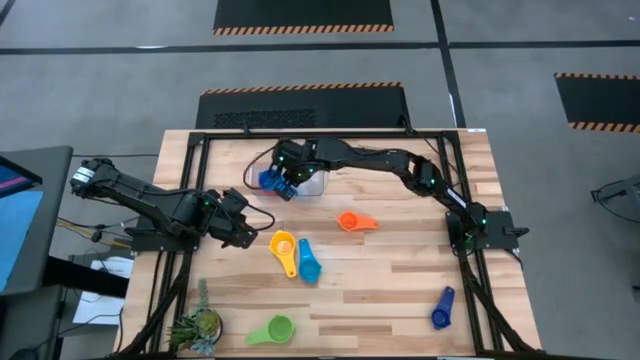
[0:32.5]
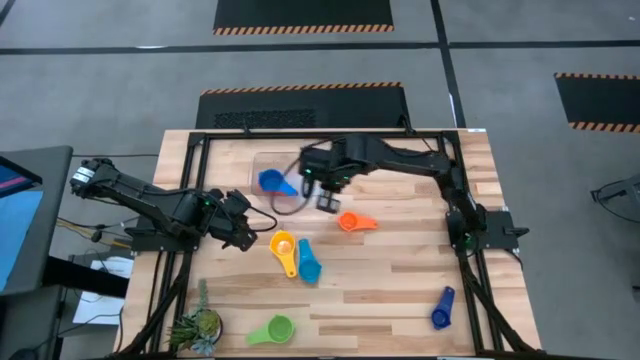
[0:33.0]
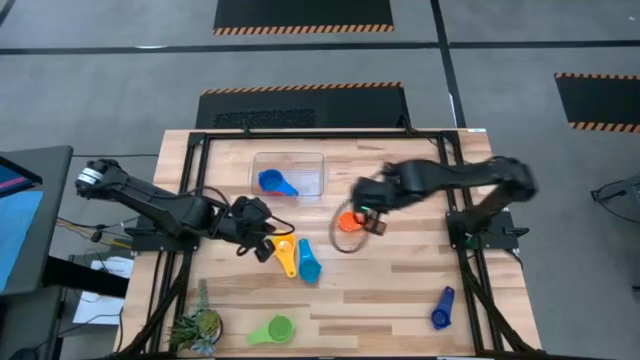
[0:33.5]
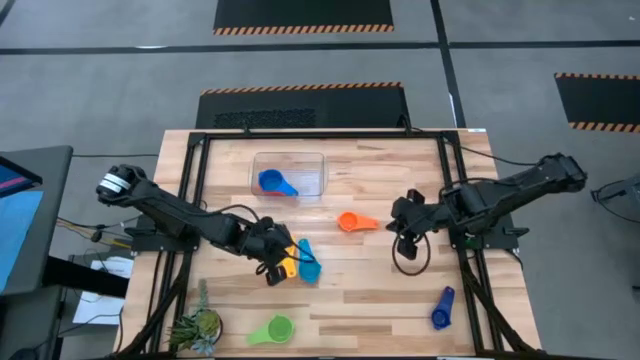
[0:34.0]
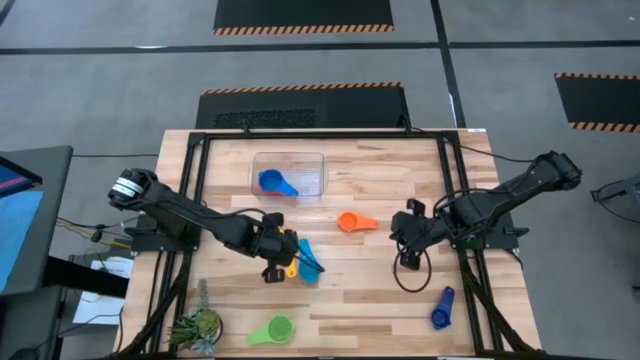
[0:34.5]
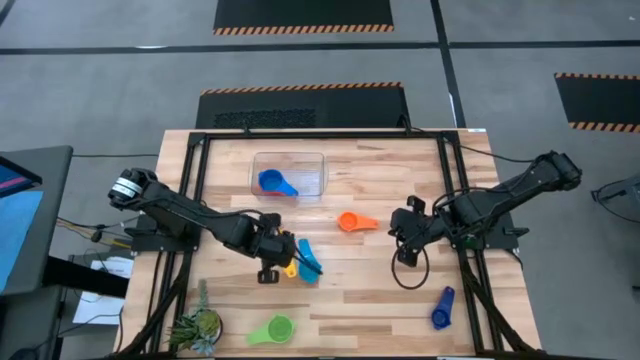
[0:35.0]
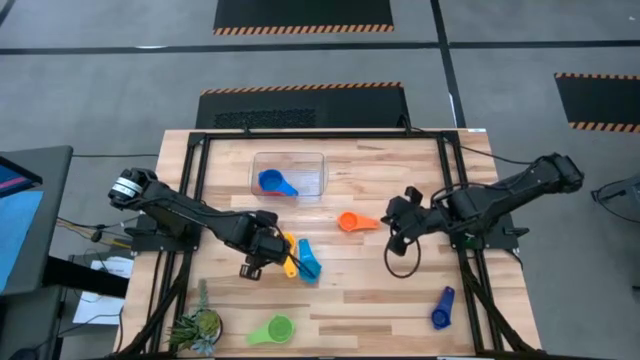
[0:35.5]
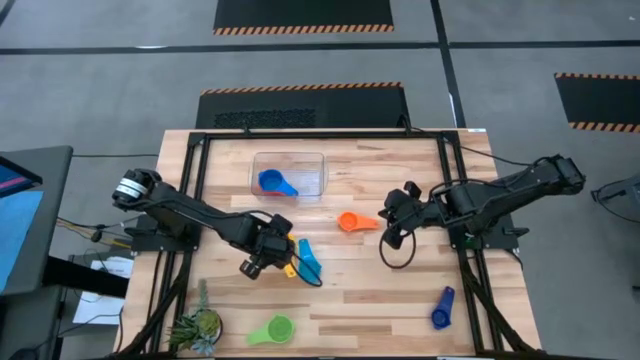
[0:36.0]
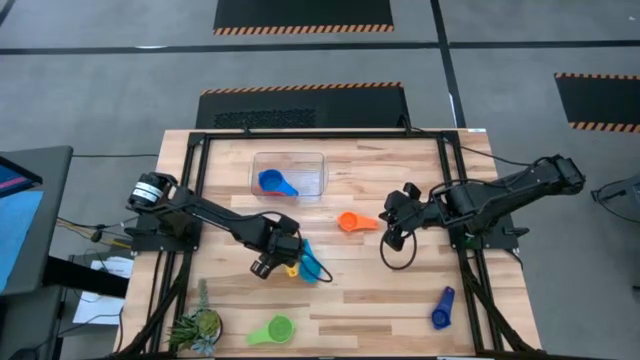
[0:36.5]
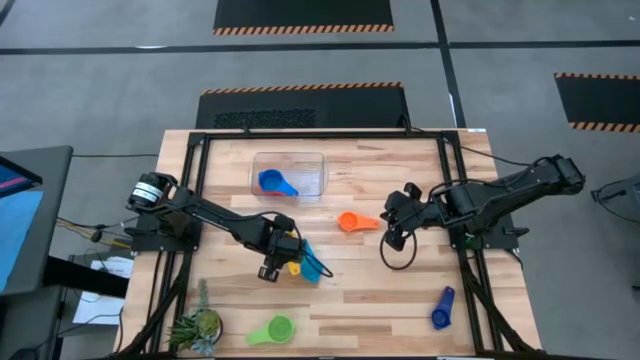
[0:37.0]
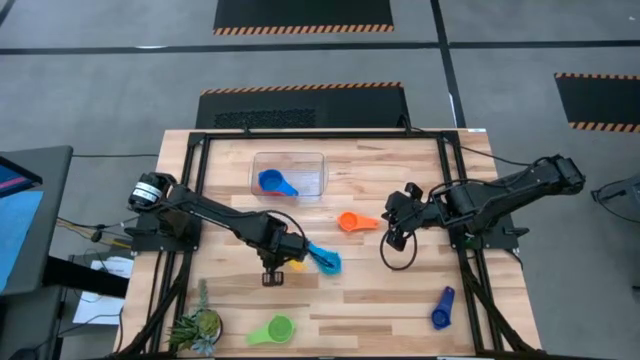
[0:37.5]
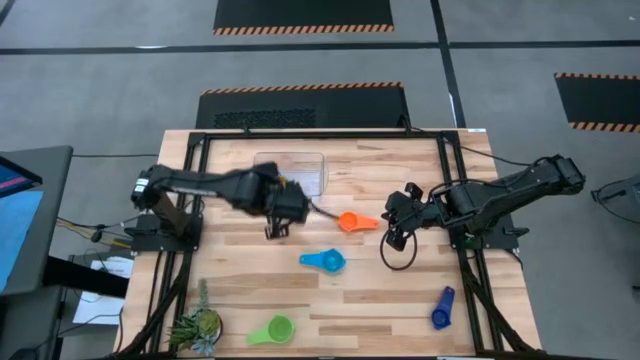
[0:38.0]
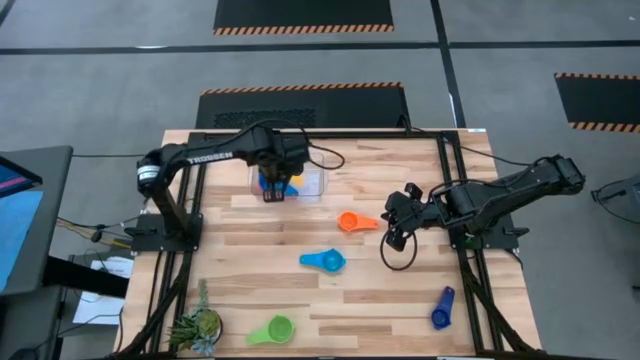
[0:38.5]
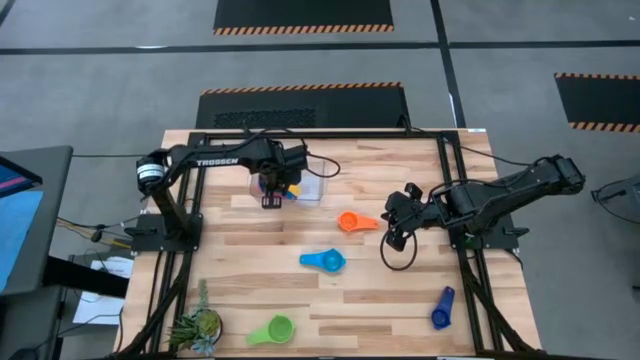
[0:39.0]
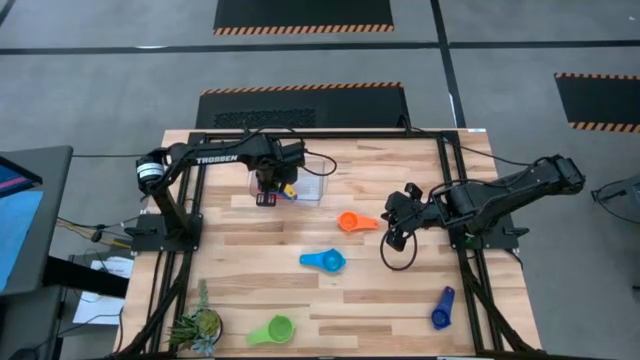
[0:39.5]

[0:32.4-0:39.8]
Task: Nest measuring cups in basket
Stack the yellow measuring cup on top of the blue measuring cup in the transparent bin

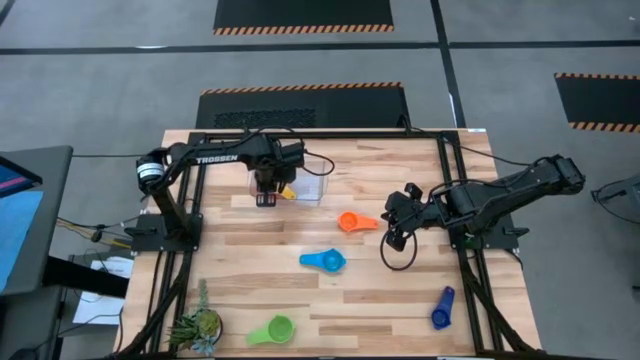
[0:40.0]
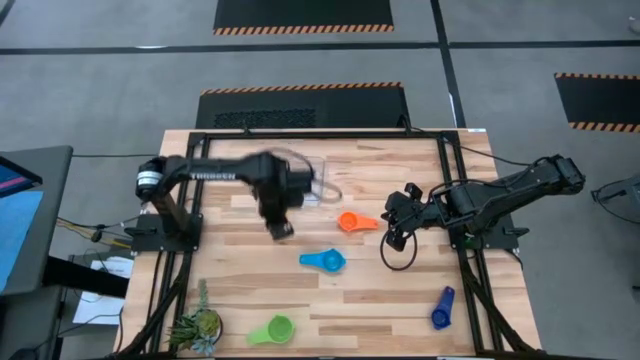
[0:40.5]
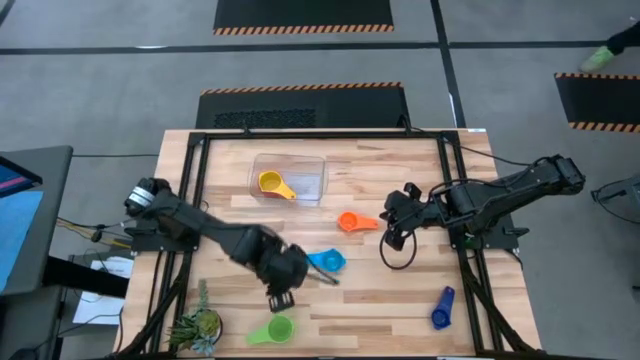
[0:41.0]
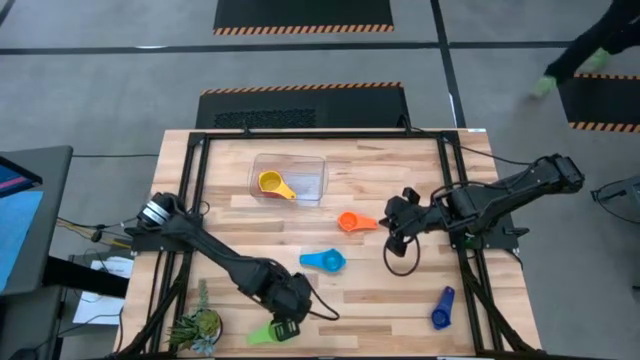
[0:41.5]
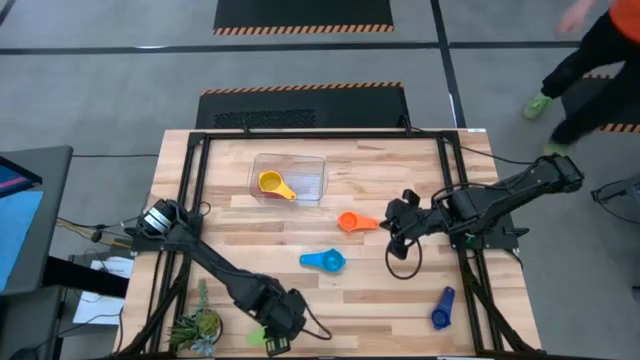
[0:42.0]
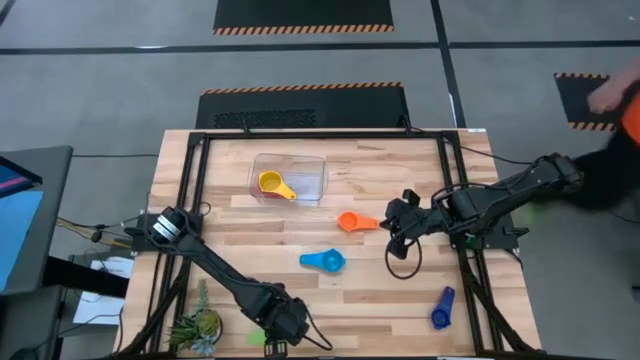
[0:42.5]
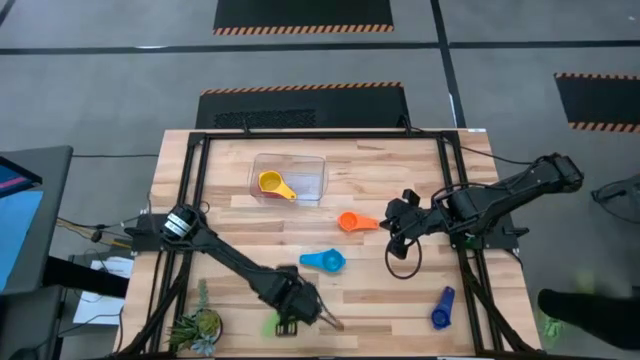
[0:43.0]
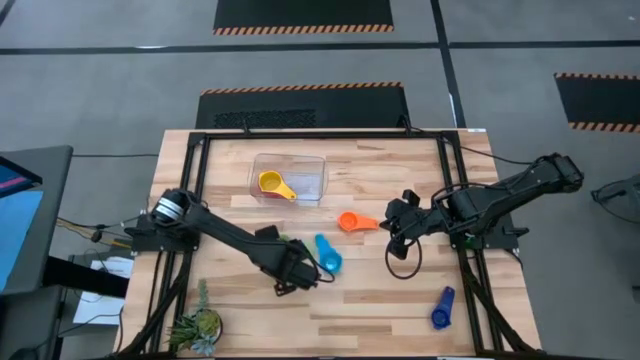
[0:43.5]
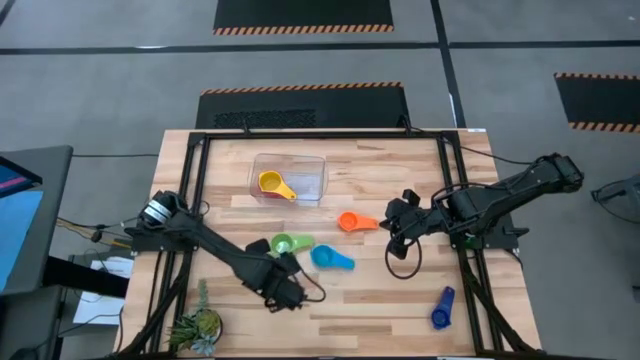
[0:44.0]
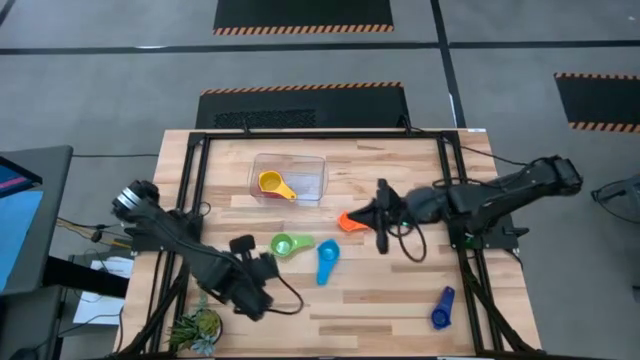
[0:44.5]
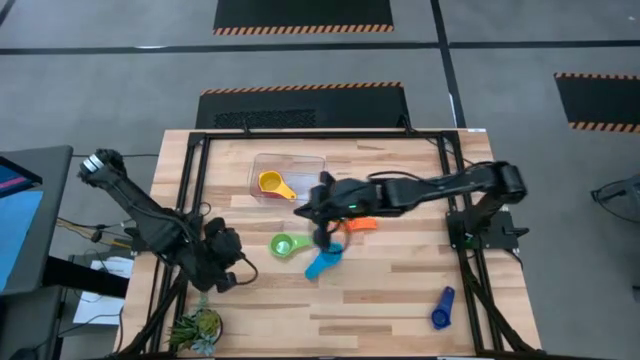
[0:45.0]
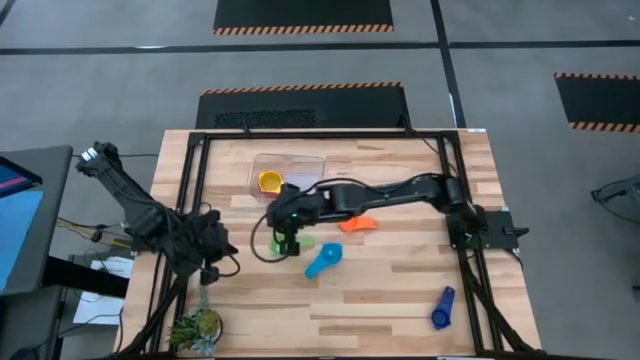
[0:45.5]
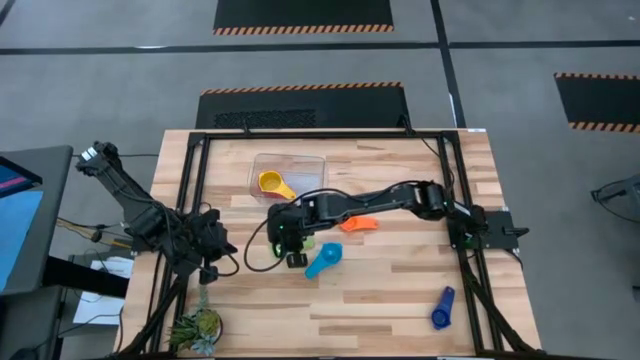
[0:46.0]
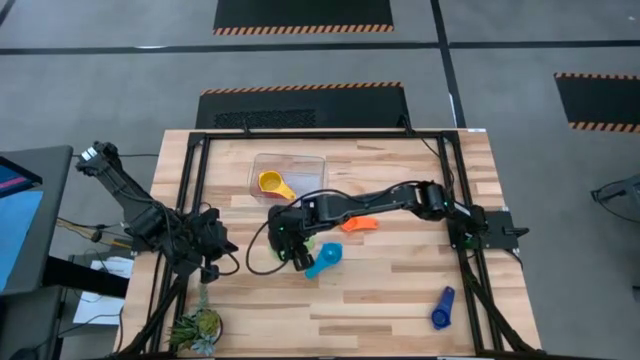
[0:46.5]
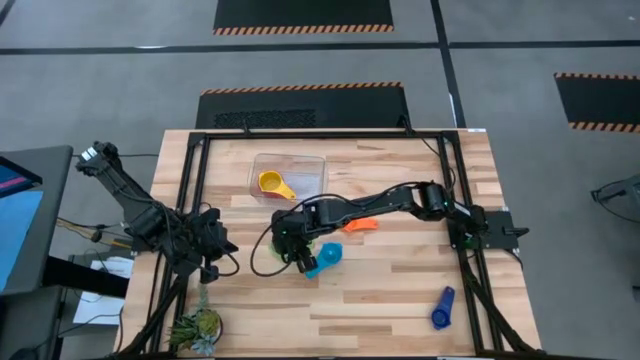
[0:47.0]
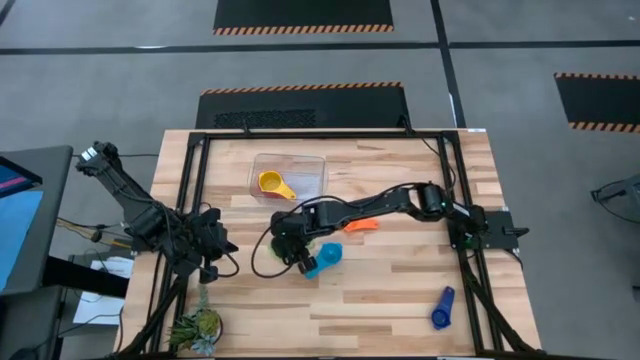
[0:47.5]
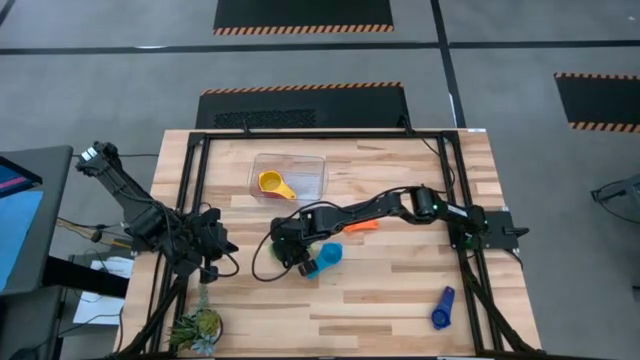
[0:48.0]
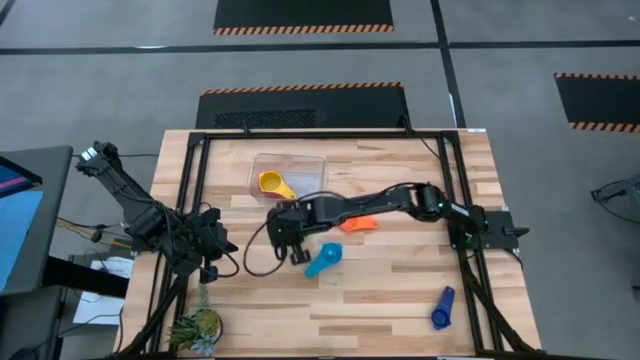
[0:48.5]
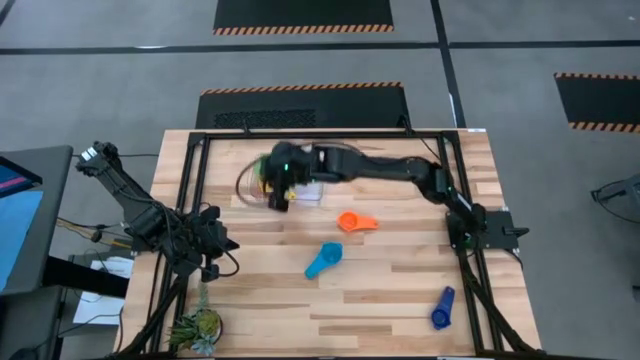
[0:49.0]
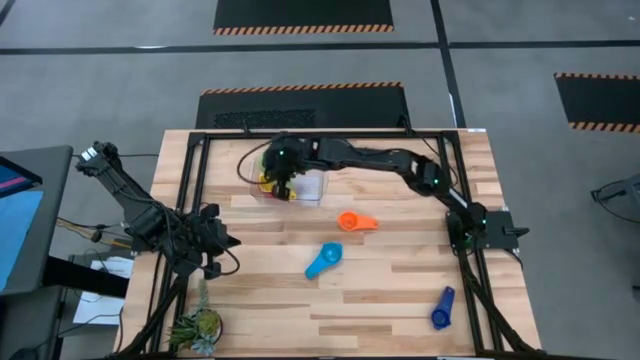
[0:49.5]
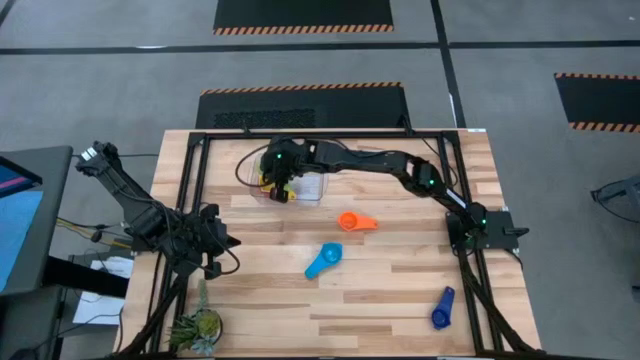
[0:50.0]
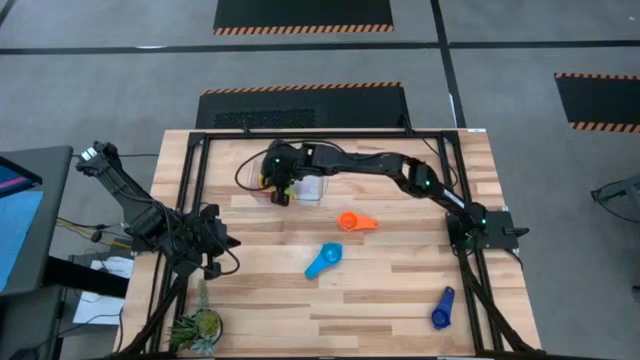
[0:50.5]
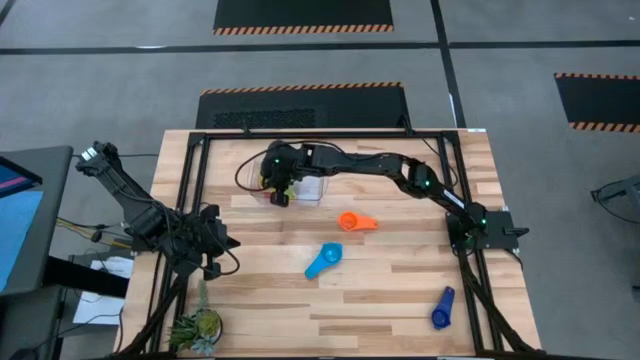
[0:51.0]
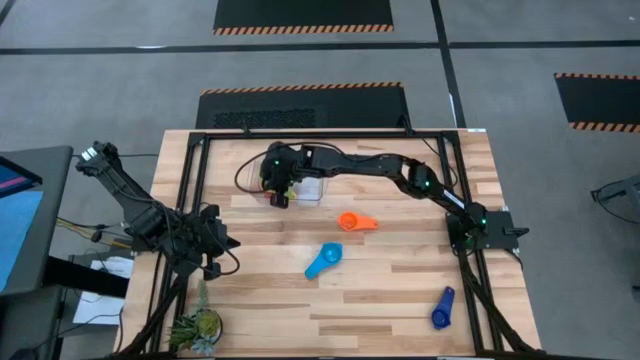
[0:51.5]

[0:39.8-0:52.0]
Stack the green measuring cup on top of the yellow measuring cup in the transparent bin

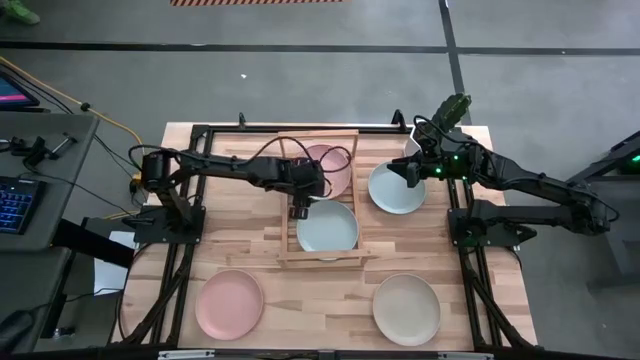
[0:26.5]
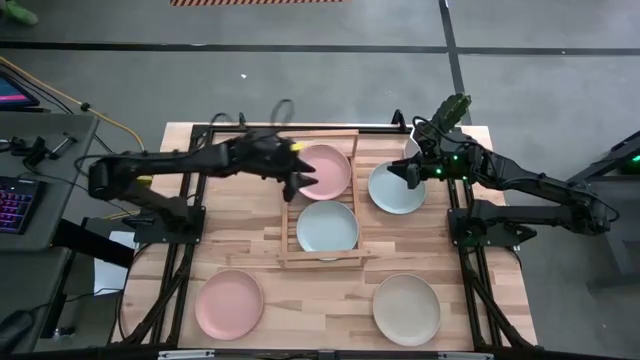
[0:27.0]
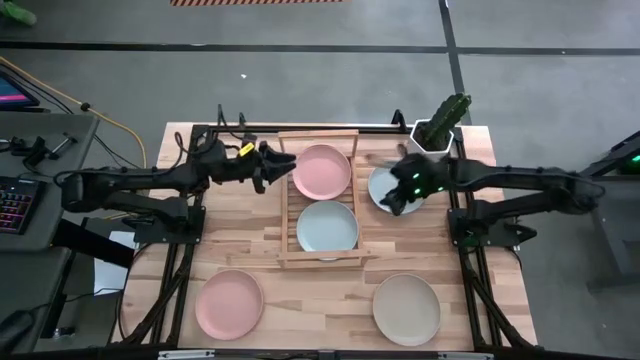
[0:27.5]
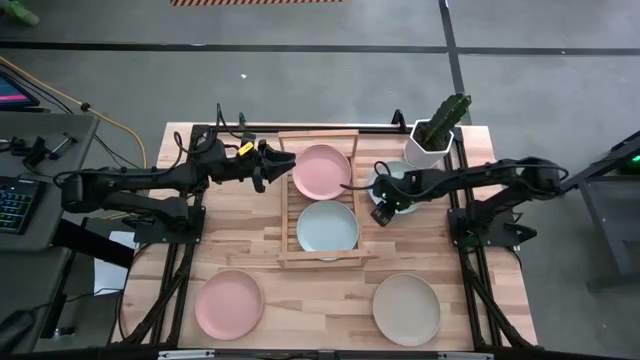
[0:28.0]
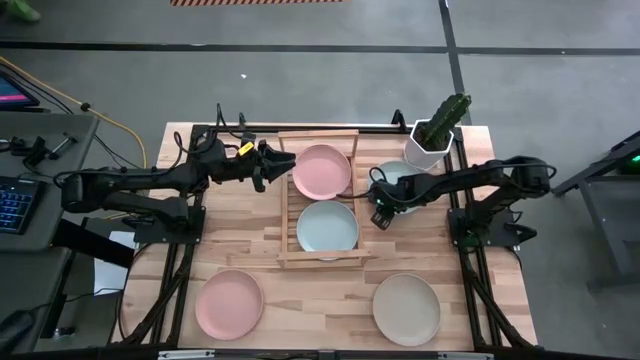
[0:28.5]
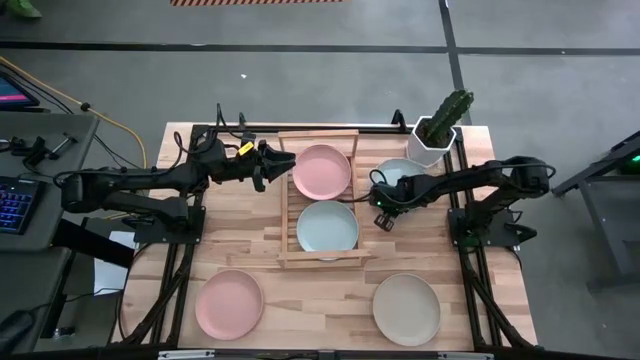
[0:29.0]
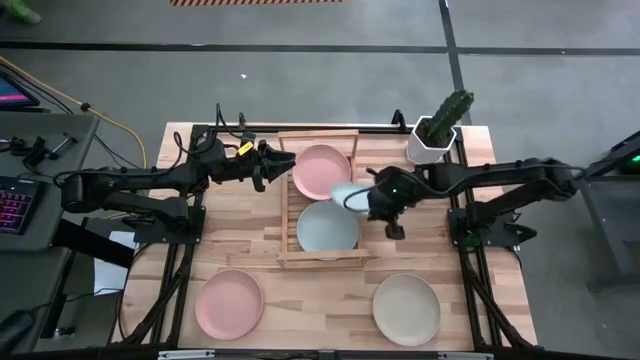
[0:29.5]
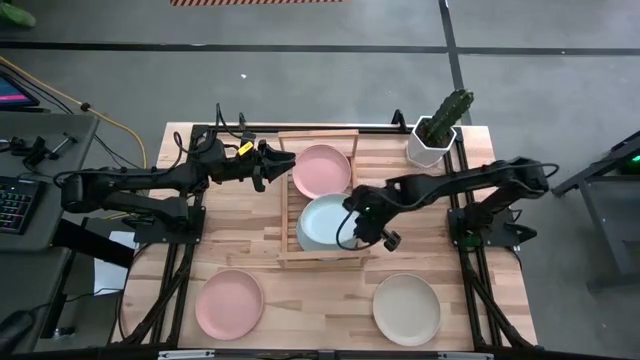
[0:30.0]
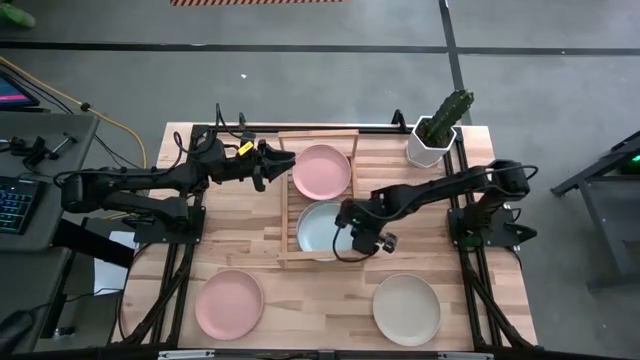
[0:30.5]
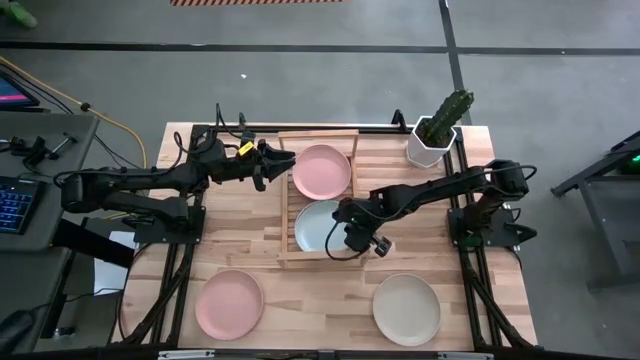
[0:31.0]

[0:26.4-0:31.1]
Task: Place and stack plates onto a shelf
Stack the blue plate on top of the other blue plate on the shelf
